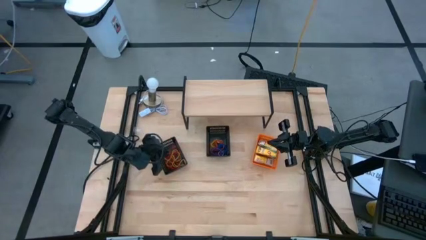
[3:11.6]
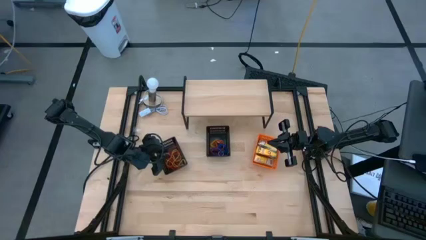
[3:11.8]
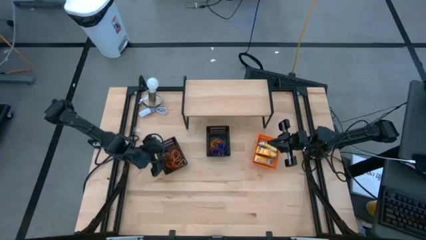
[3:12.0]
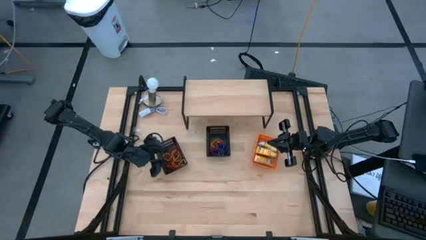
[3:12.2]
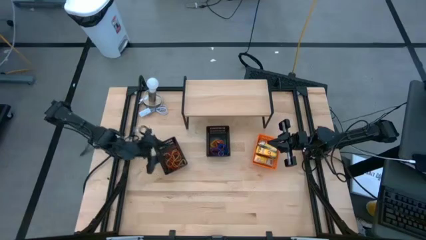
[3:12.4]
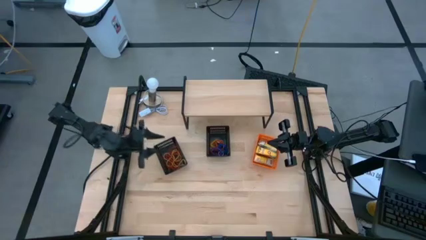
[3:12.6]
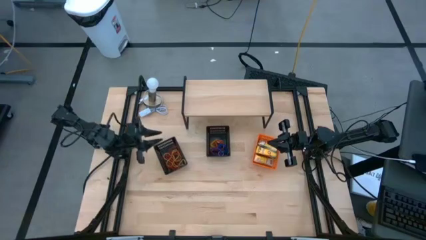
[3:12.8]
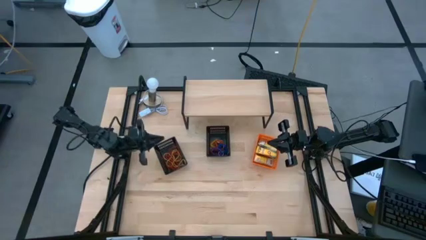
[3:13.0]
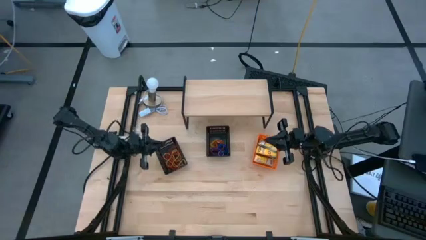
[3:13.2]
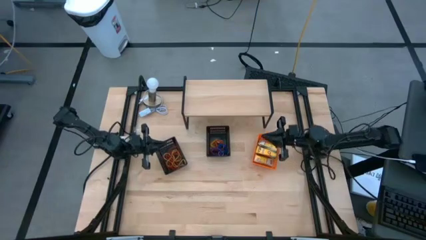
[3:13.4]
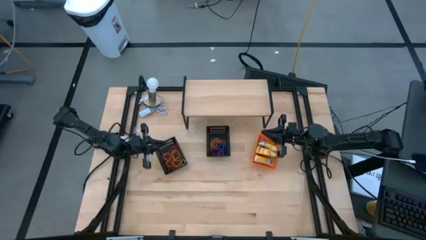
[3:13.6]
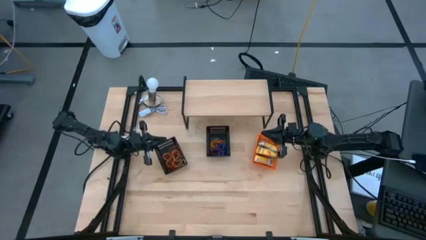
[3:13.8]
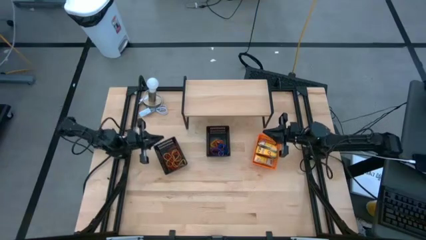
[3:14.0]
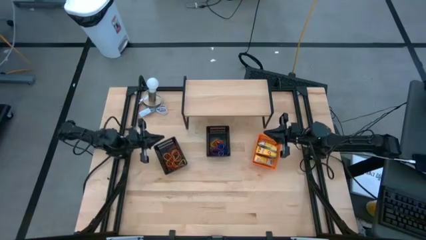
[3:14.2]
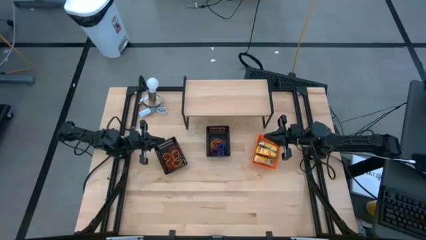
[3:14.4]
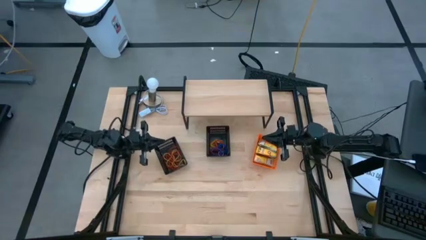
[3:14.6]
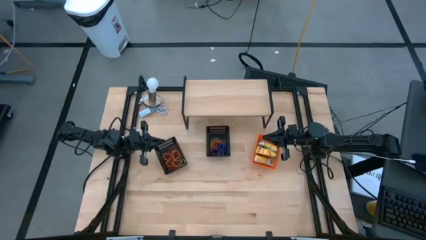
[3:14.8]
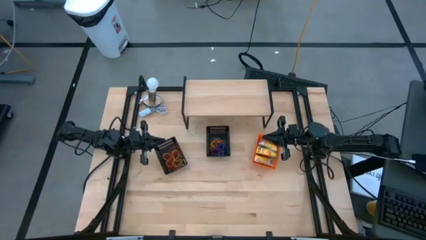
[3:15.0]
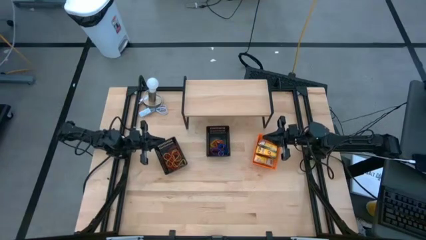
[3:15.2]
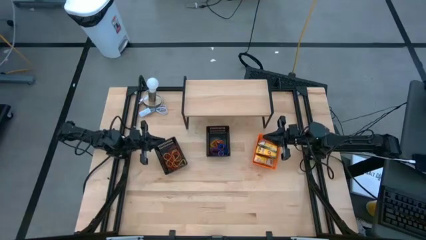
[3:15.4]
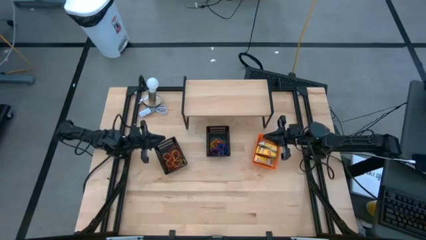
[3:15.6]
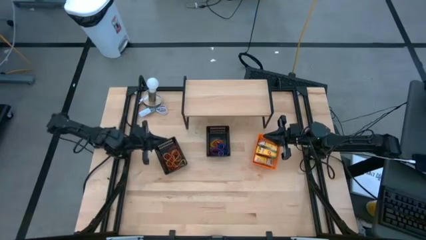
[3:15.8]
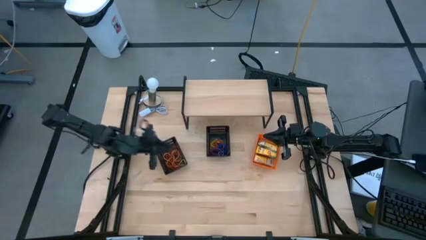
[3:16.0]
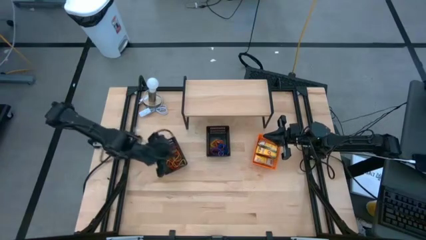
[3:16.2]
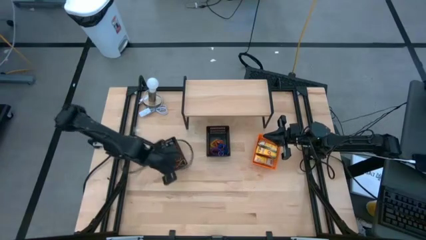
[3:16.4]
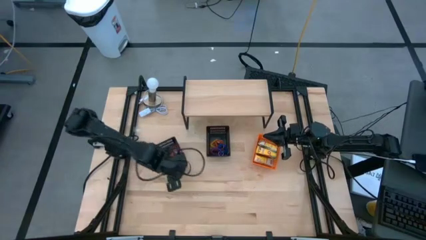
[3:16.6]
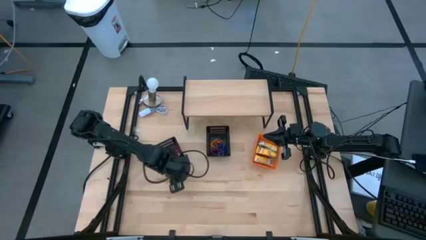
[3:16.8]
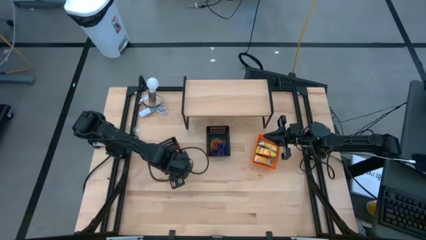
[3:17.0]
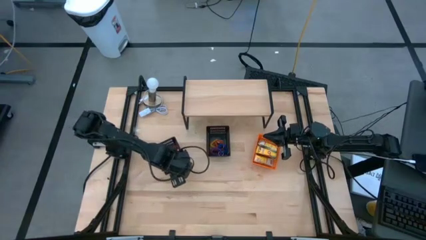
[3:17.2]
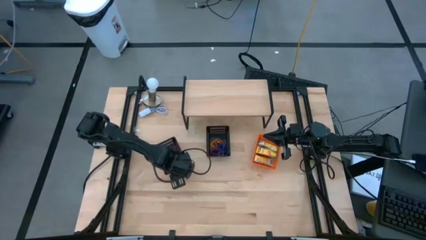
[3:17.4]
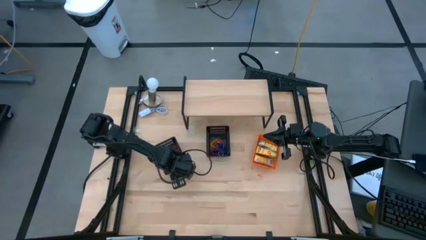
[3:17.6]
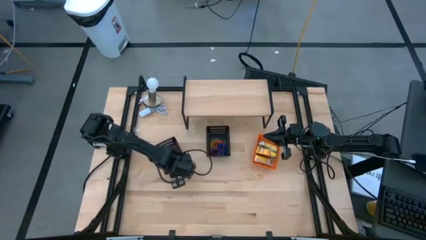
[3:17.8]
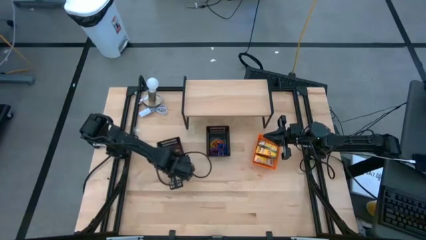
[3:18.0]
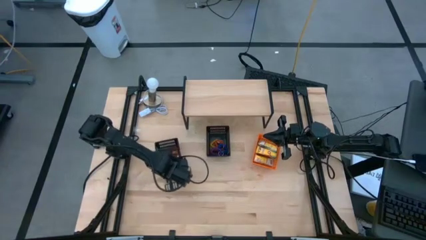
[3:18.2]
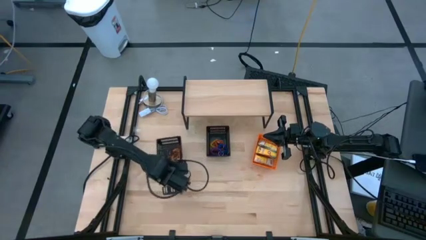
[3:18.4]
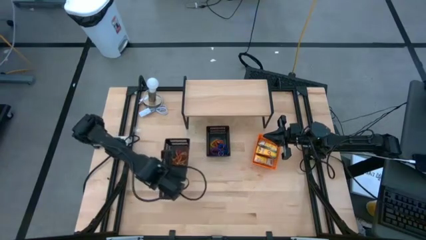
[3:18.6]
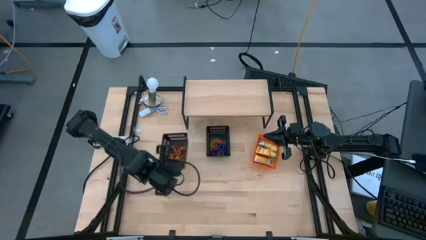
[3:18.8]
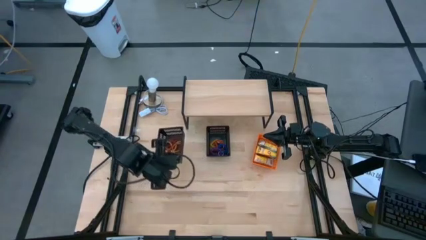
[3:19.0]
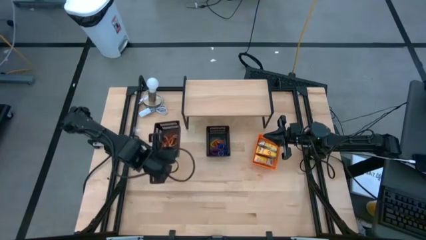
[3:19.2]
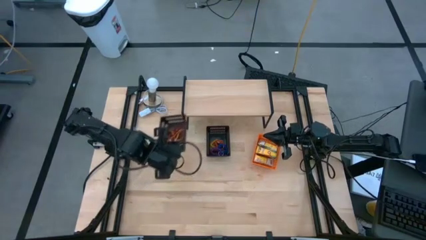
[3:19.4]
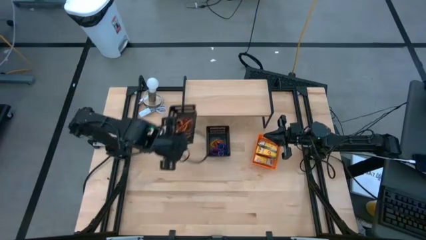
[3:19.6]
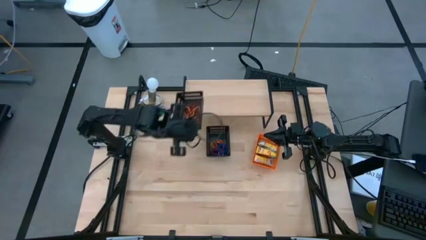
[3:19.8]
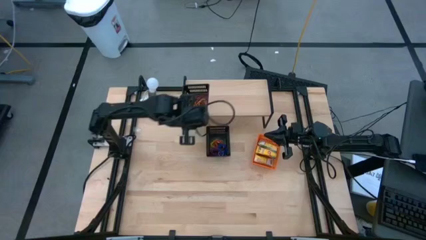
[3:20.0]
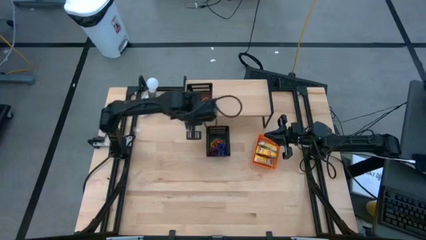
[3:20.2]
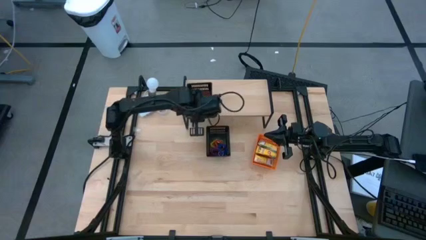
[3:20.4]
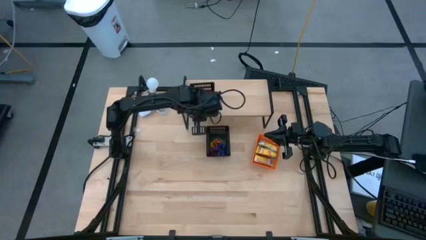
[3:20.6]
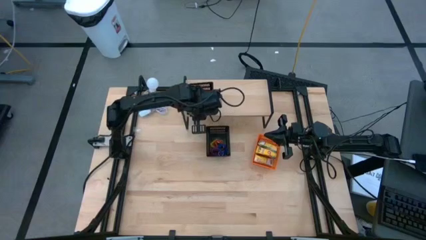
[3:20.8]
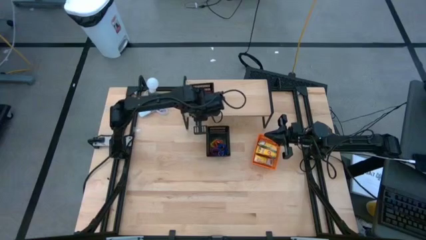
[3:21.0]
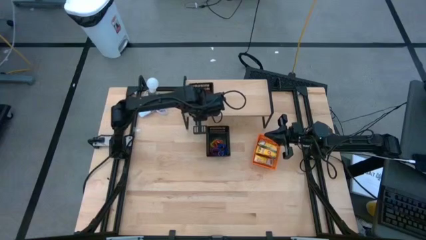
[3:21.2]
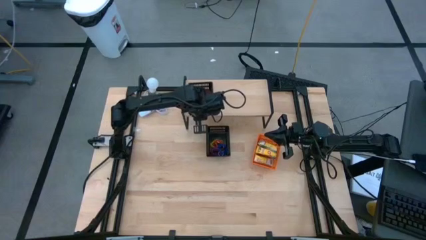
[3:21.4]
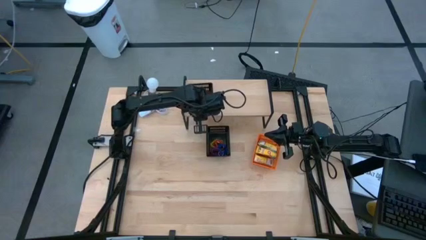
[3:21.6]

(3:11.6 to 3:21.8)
Task: Pick & Place Office Desk Supplies
Put the left black basket filled with rubber bands on the shelf

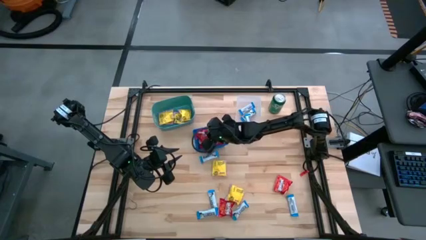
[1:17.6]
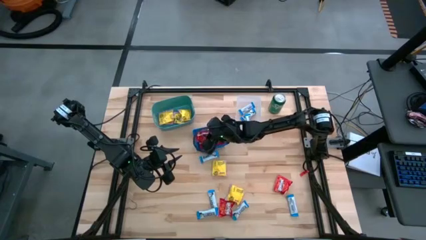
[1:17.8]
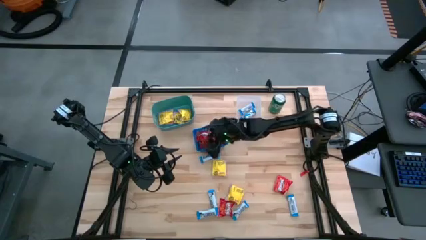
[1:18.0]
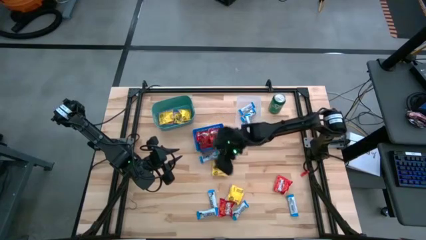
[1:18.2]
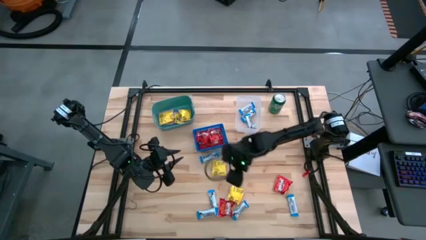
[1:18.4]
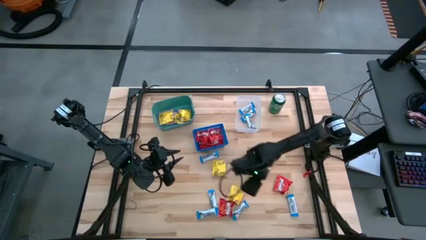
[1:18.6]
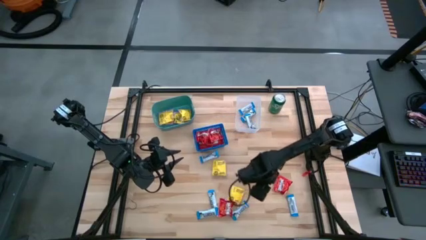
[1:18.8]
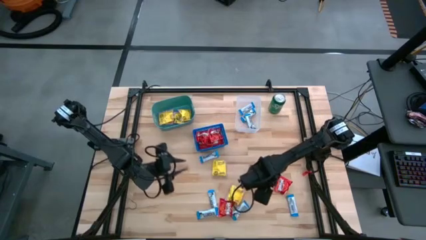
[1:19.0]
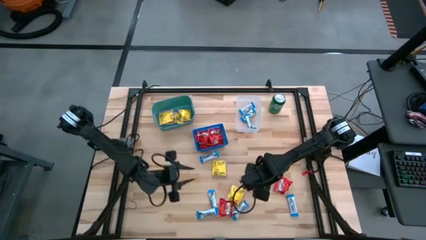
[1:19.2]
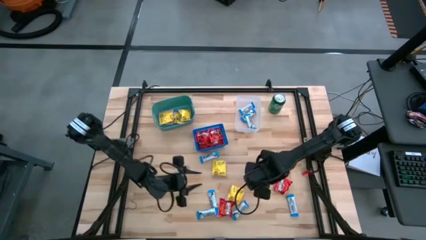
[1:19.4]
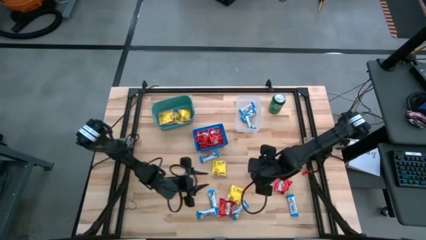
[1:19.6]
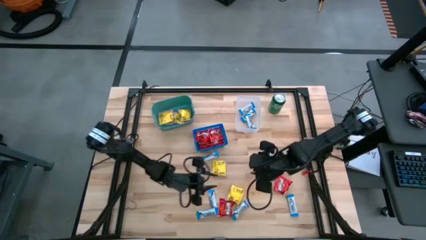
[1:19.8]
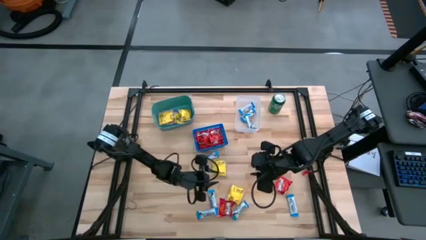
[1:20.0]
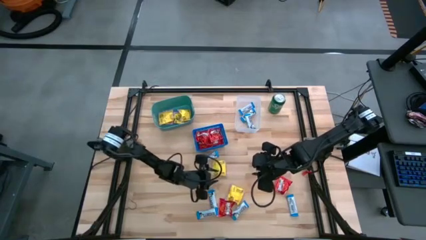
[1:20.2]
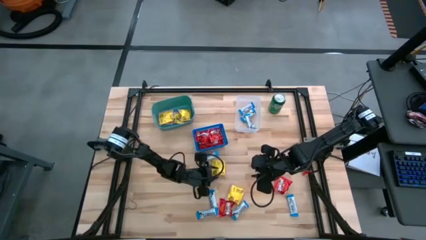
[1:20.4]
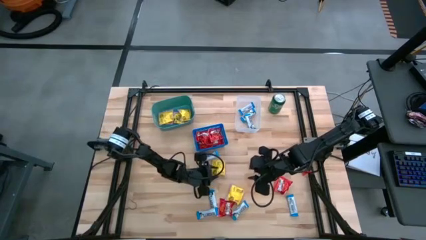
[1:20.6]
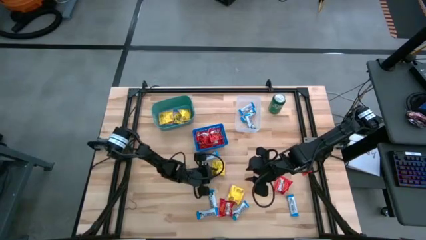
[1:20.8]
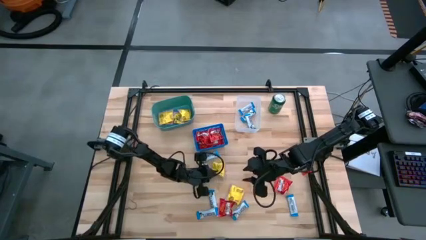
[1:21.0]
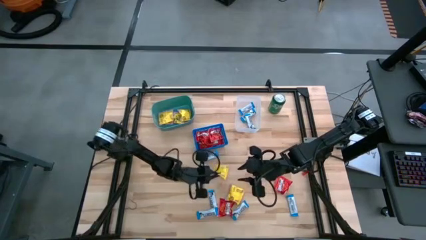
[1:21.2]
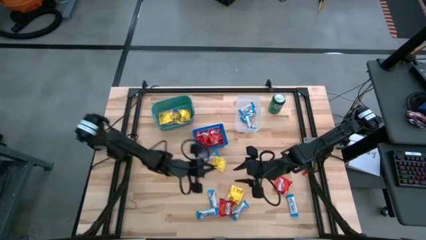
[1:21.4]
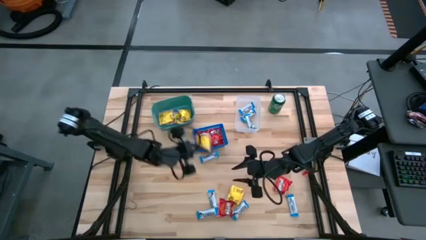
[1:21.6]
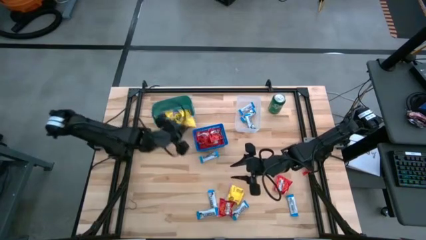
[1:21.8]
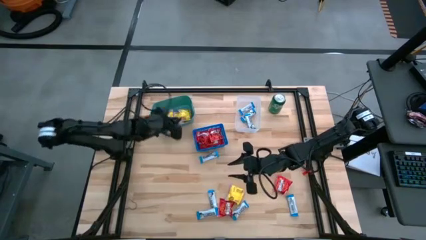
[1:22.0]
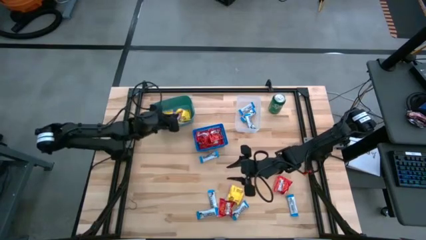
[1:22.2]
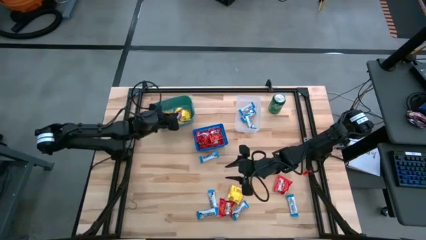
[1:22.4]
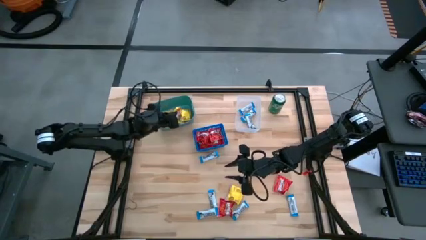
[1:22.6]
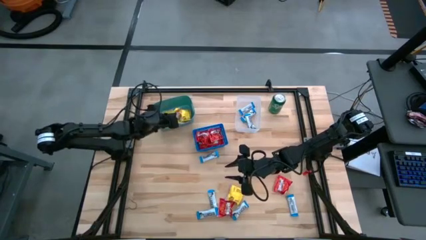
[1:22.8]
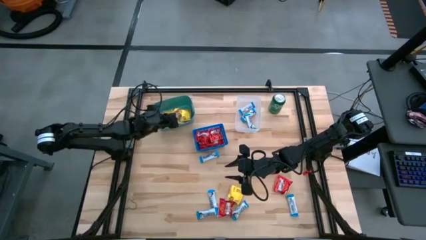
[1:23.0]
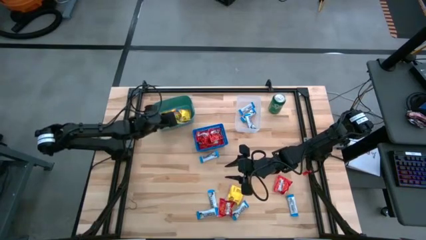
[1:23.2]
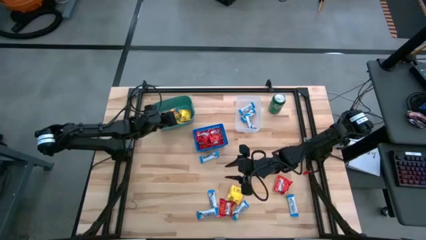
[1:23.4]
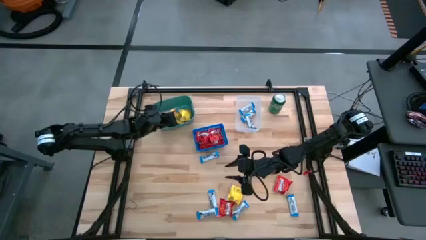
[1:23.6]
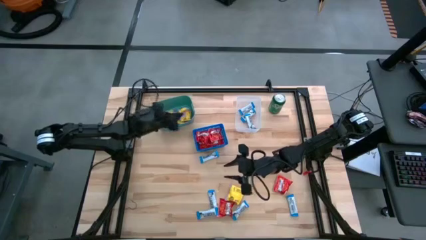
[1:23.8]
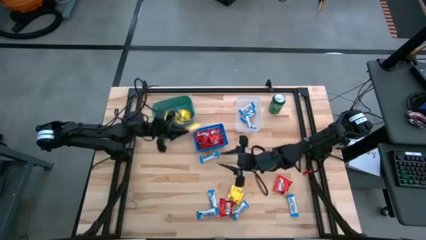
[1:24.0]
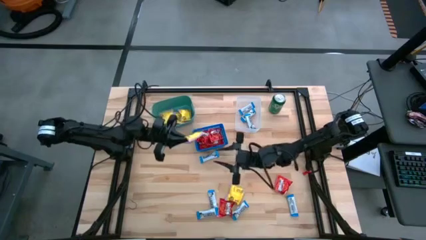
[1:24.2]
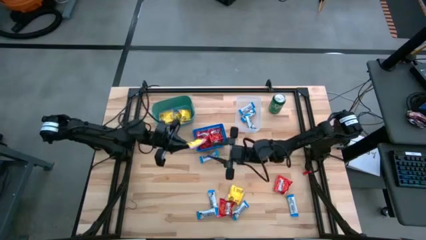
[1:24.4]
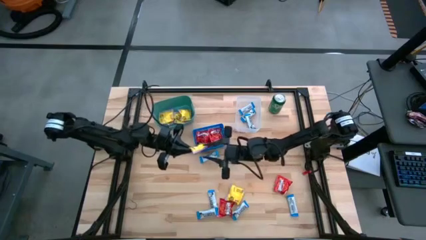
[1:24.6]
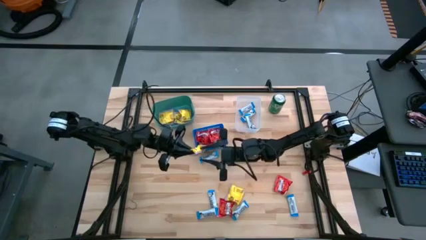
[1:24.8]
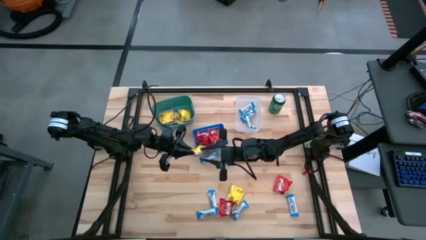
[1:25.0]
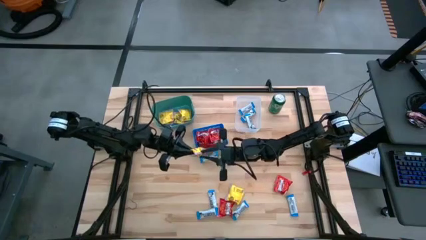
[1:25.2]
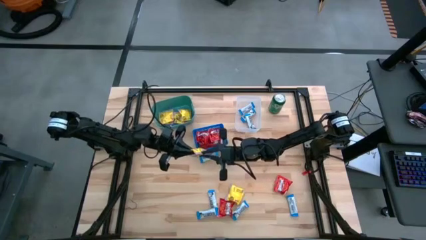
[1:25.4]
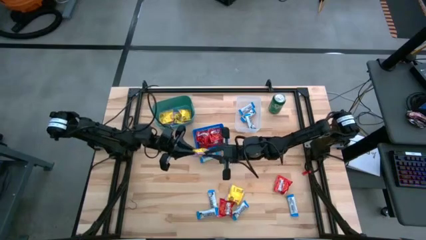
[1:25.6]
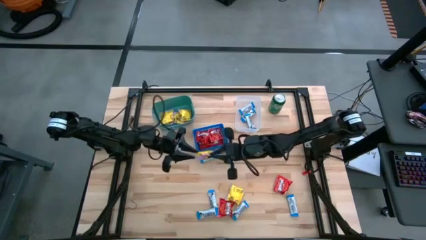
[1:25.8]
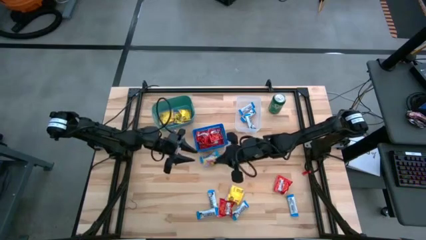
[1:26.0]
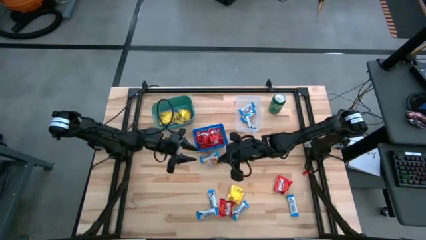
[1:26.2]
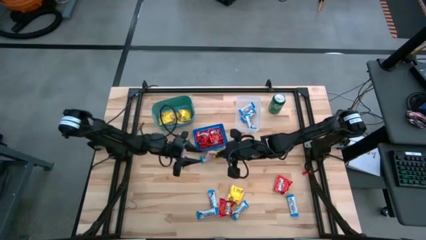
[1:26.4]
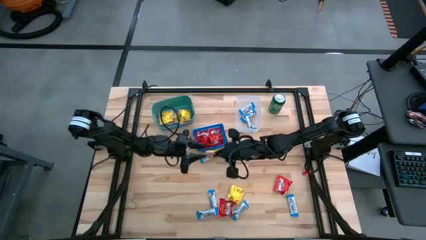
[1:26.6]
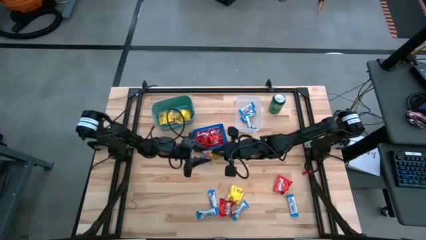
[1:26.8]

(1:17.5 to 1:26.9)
Task: Sort candy
Put the sour patch candy into the blue green bin
